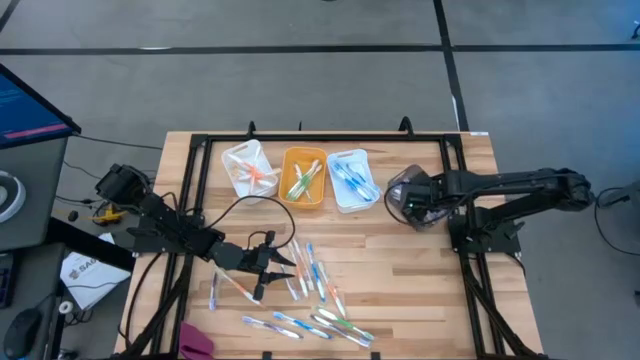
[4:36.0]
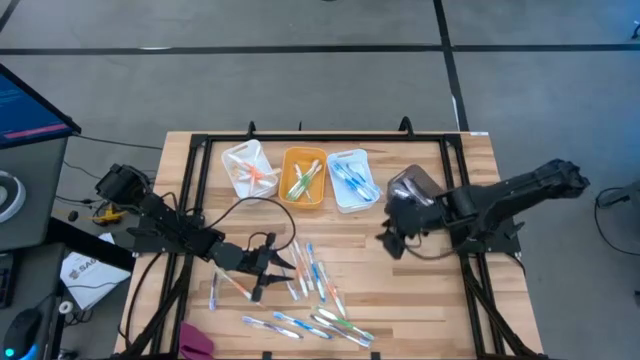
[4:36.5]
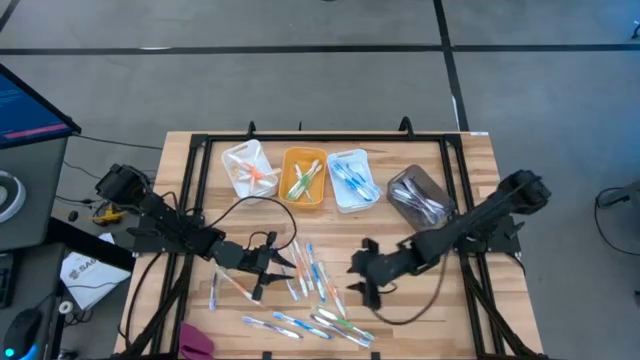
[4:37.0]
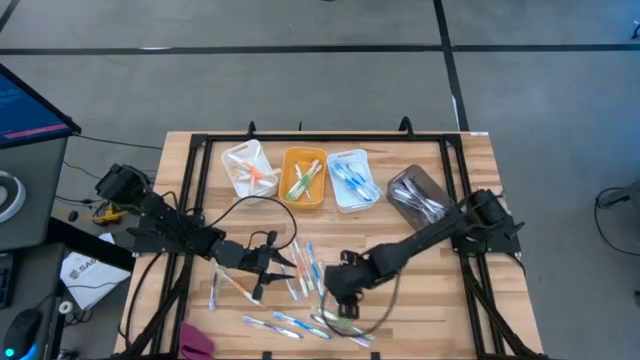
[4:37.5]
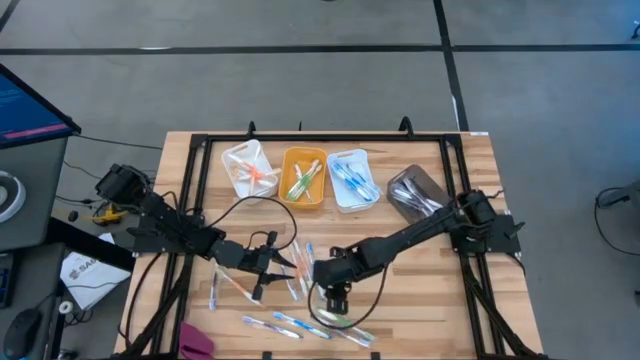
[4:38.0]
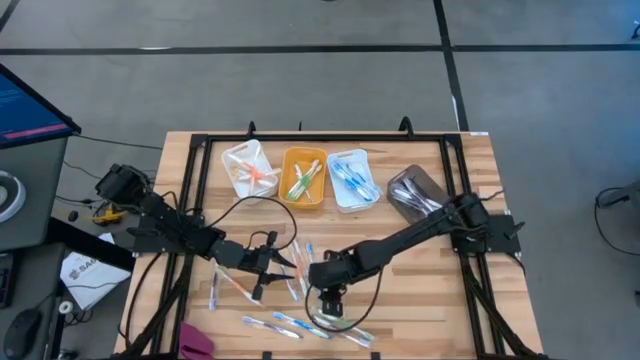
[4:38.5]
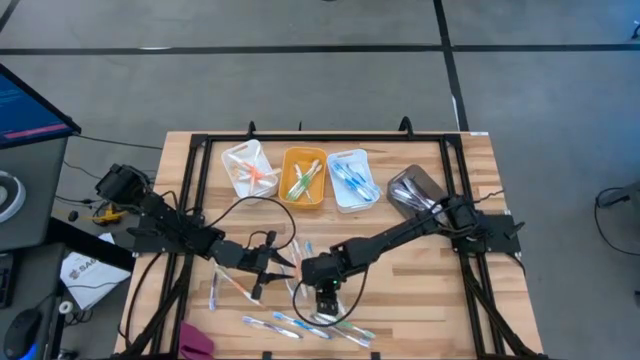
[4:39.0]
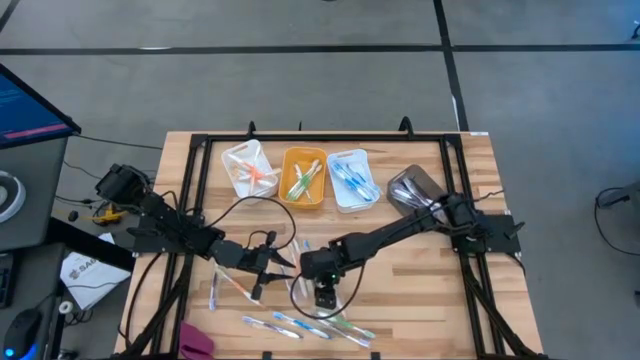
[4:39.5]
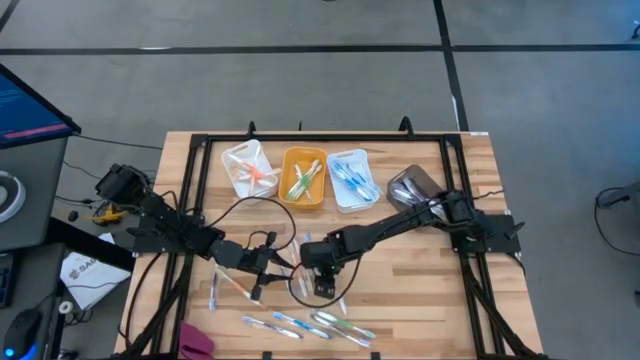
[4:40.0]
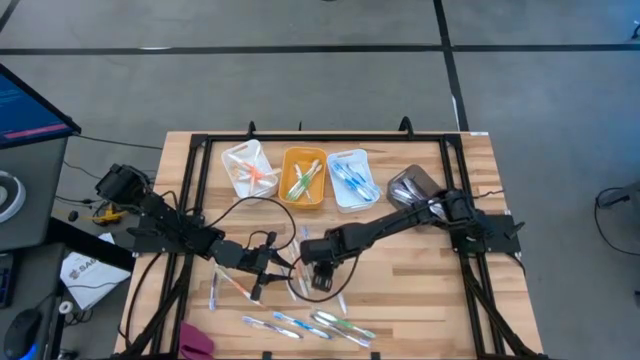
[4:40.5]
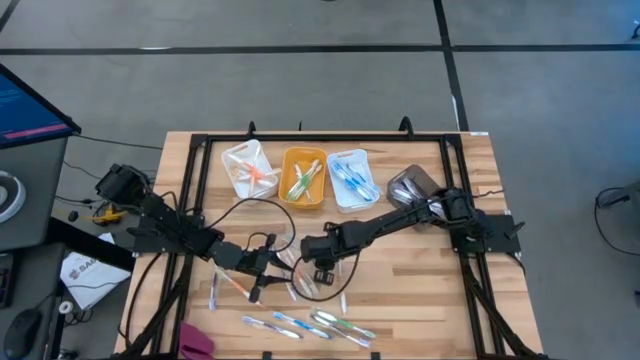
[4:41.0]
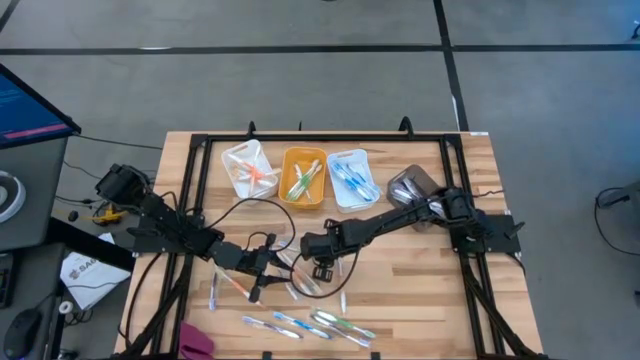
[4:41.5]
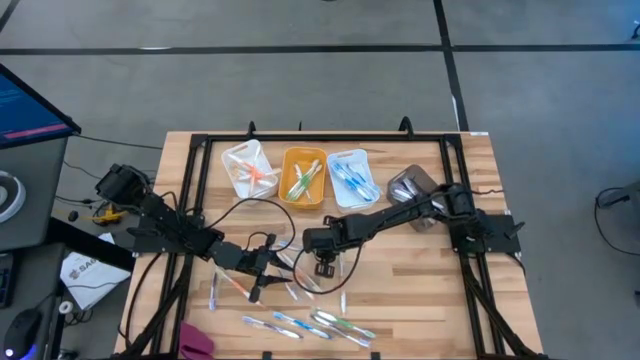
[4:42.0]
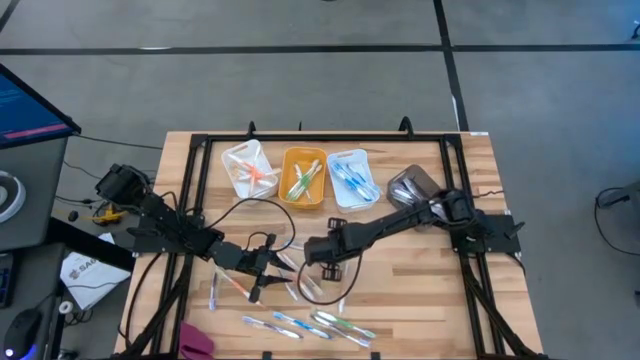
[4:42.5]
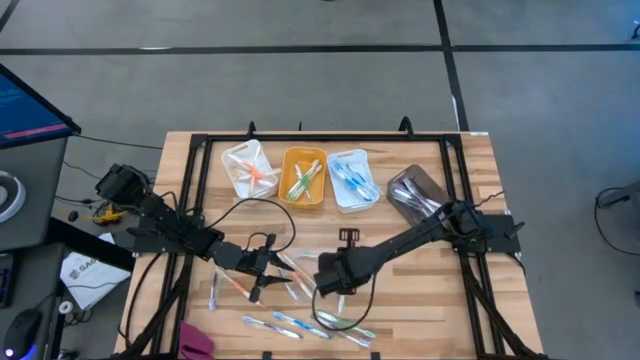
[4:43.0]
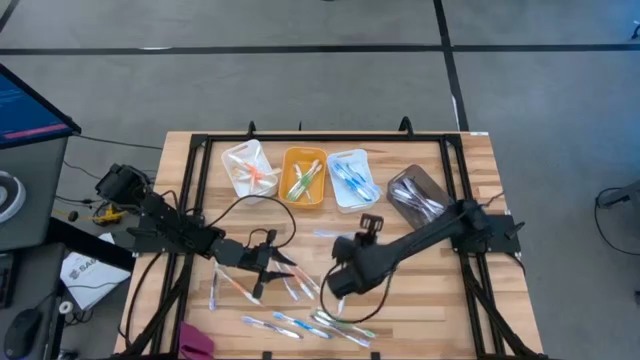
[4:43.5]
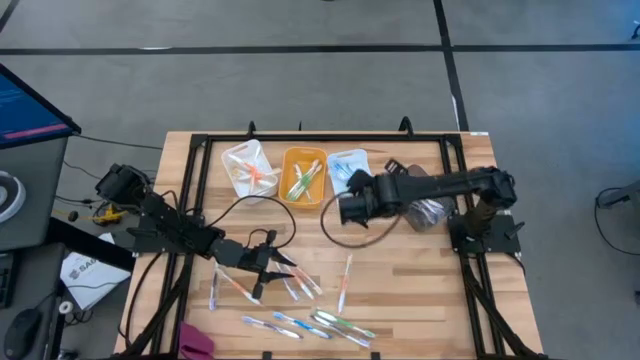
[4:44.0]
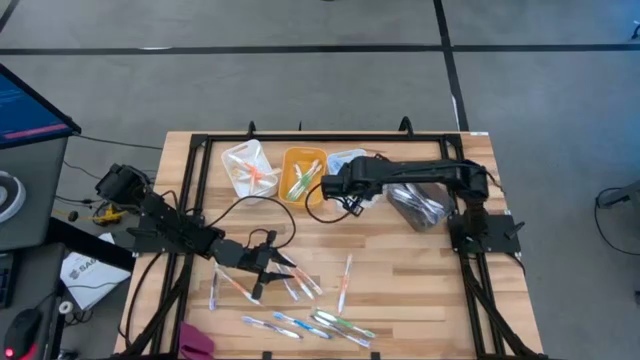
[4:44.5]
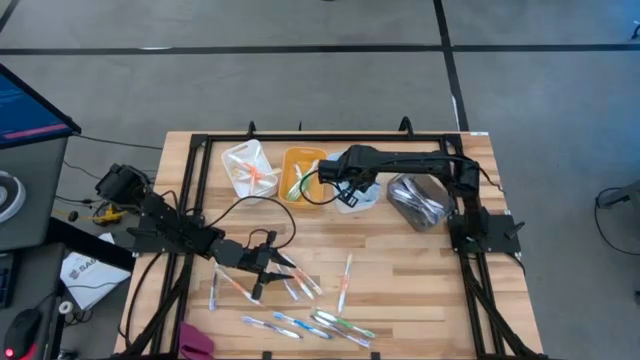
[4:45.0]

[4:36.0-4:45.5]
Task: Pick & Place Toothbrushes
Put the white blue toothbrush into the right white bin

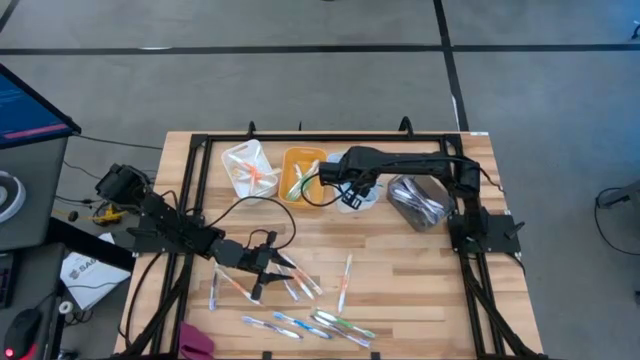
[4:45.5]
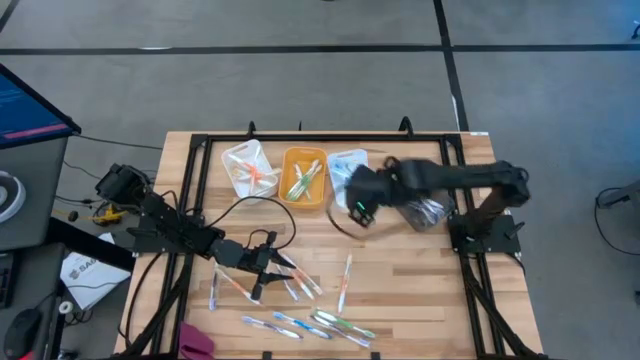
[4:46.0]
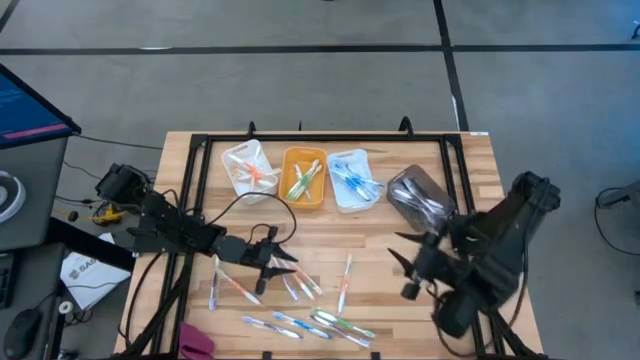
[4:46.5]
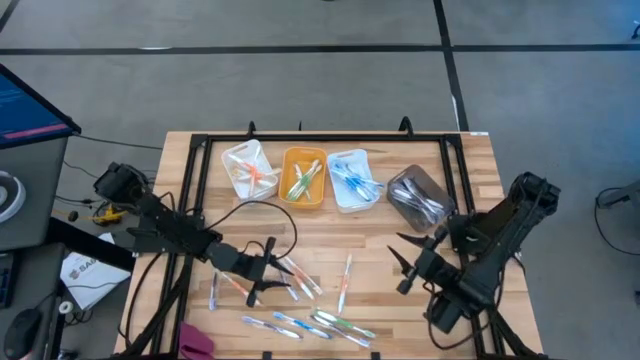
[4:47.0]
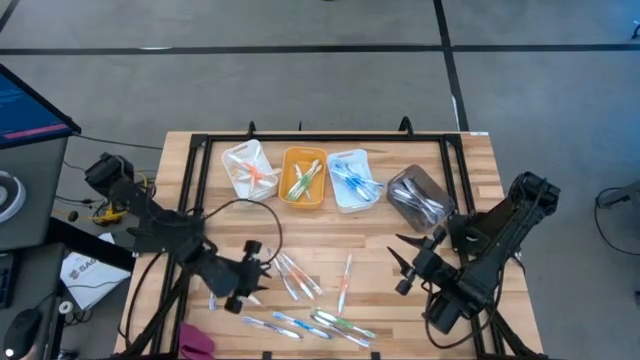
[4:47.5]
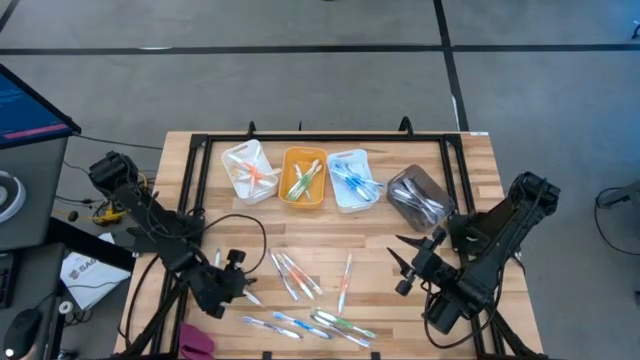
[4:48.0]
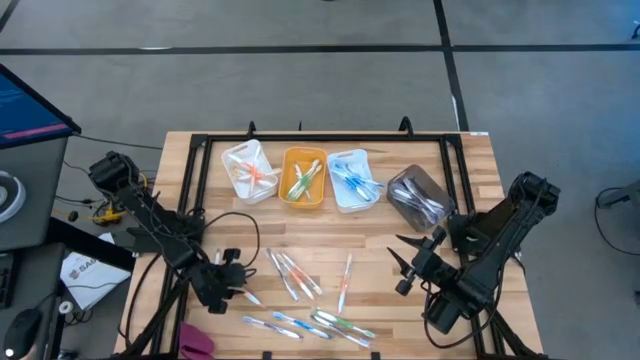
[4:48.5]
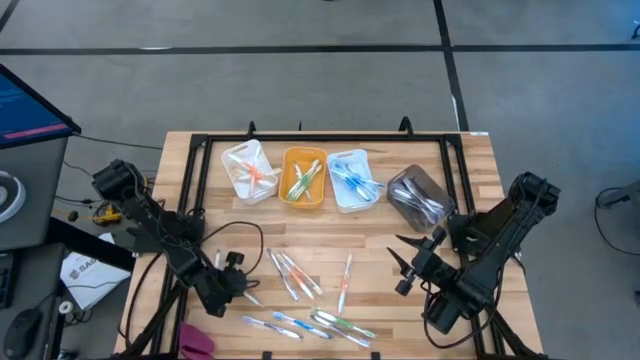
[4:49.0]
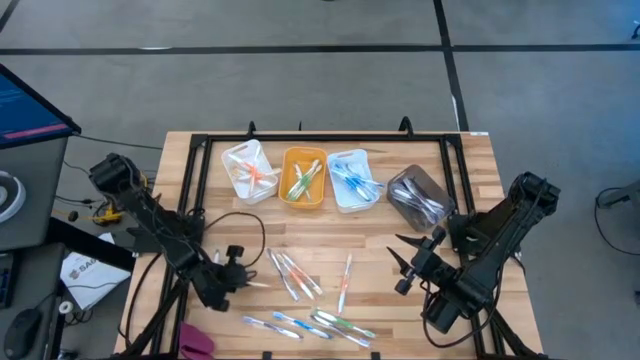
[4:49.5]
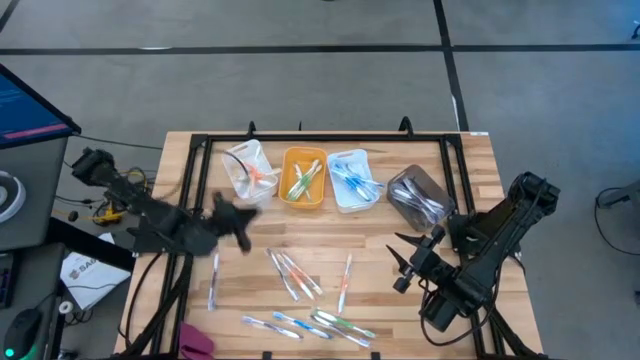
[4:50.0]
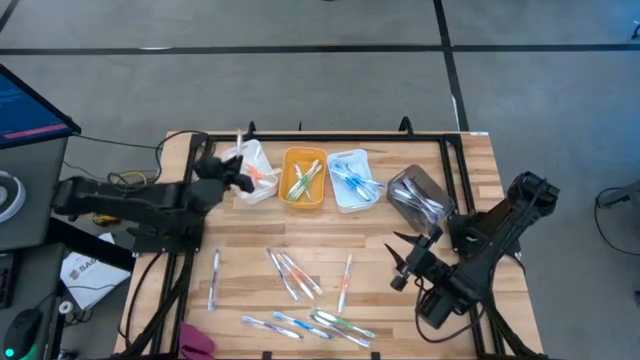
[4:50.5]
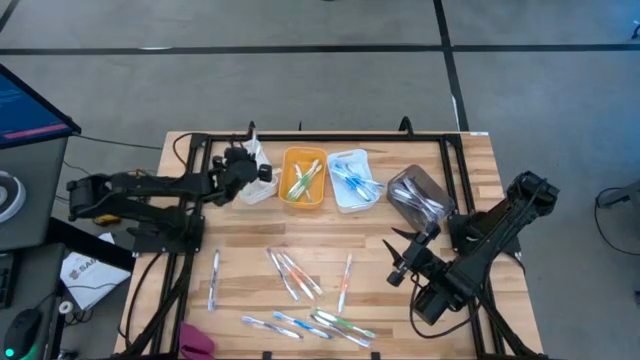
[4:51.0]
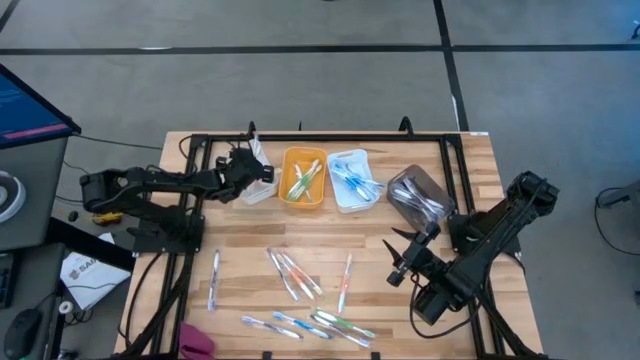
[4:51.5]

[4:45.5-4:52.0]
Put the white orange toothbrush into the left white bin

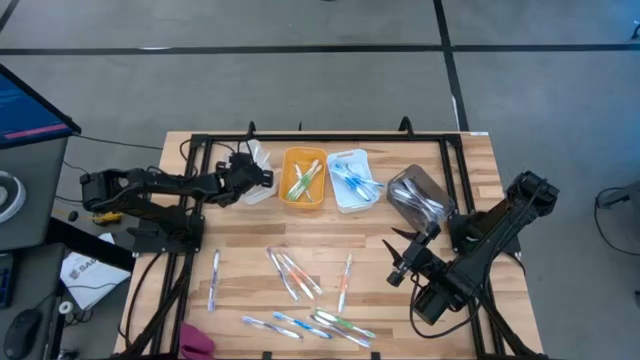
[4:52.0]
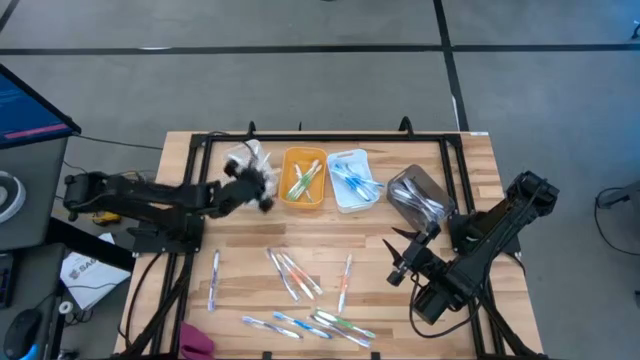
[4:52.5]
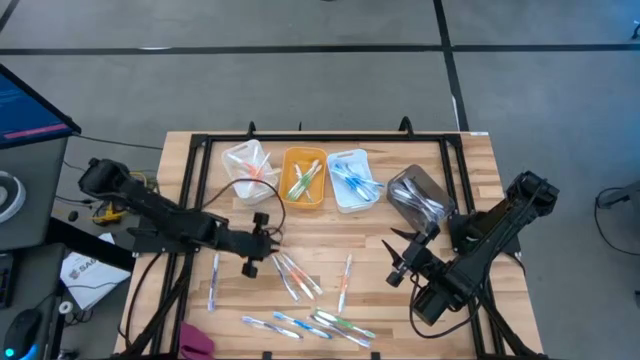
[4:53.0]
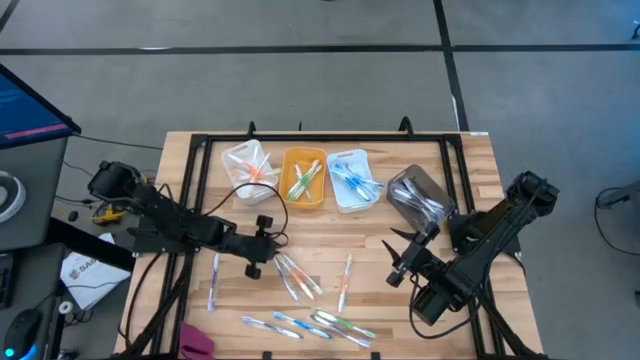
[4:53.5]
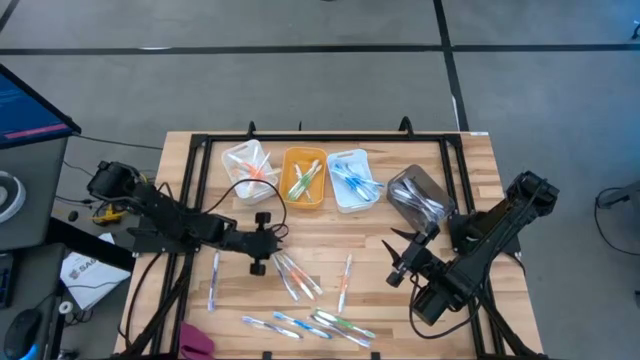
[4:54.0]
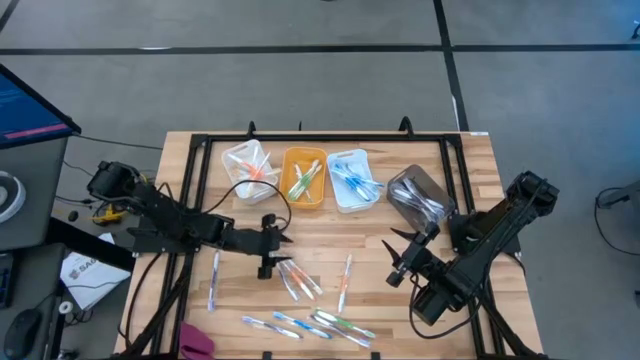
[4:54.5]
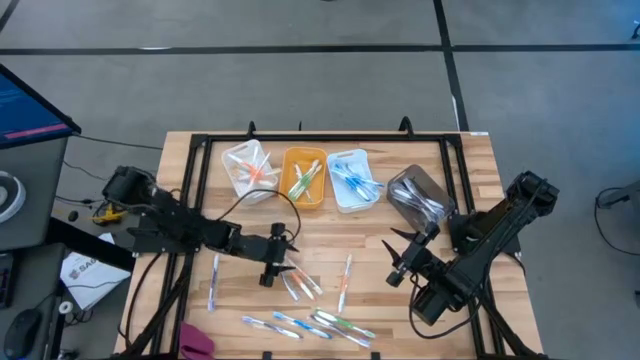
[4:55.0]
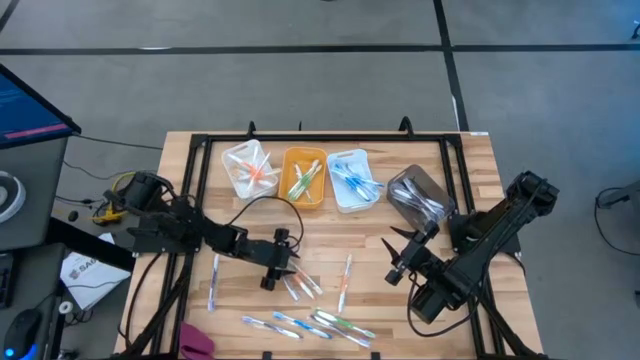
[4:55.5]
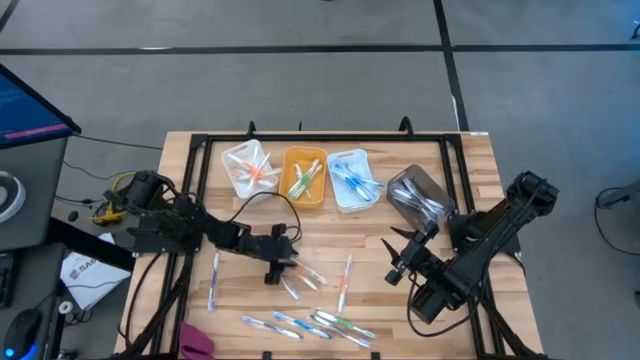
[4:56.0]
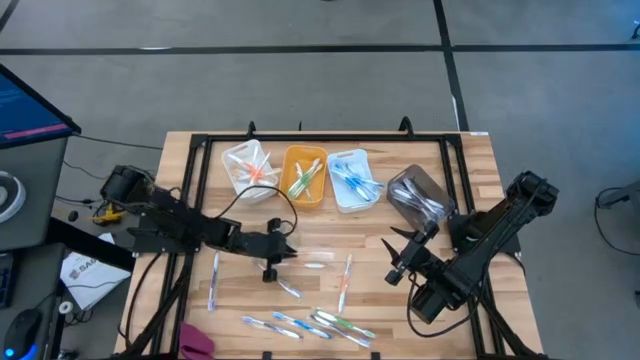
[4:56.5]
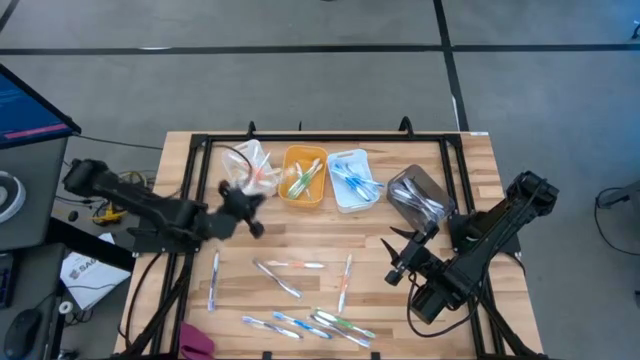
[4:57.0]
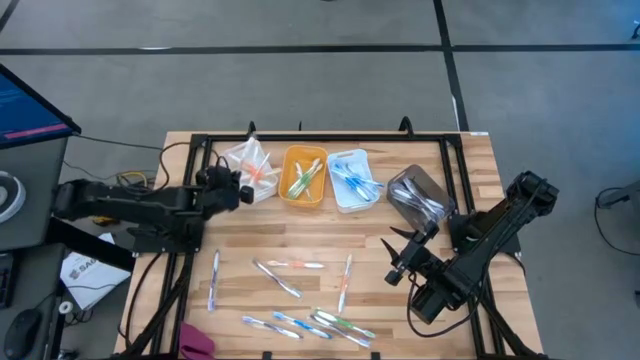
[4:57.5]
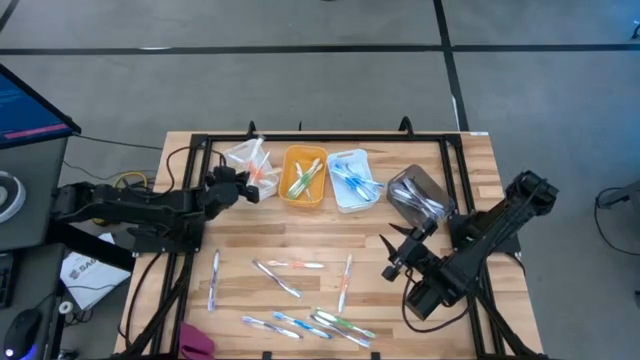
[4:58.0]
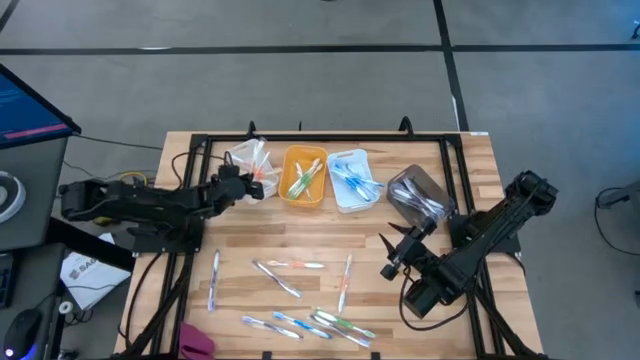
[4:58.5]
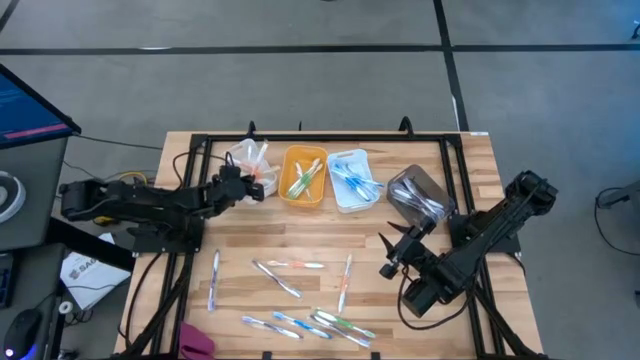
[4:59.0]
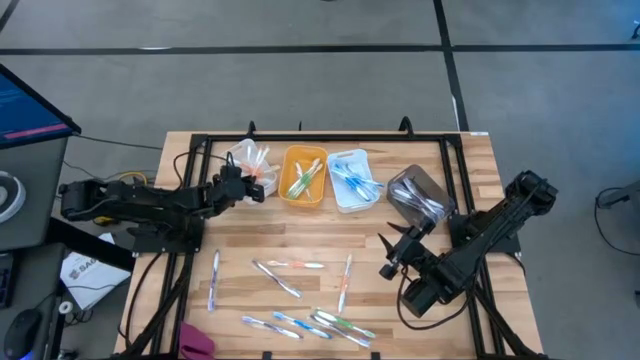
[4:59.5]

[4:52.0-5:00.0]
Put the white orange toothbrush into the left white bin
